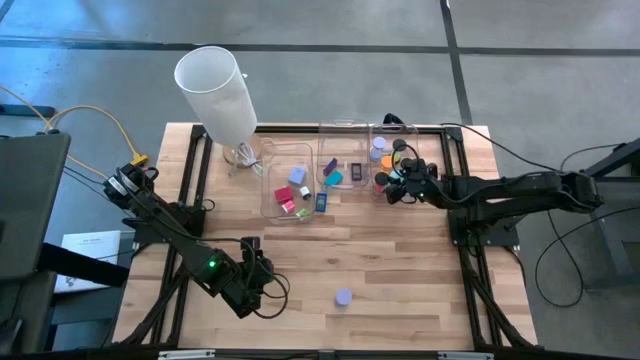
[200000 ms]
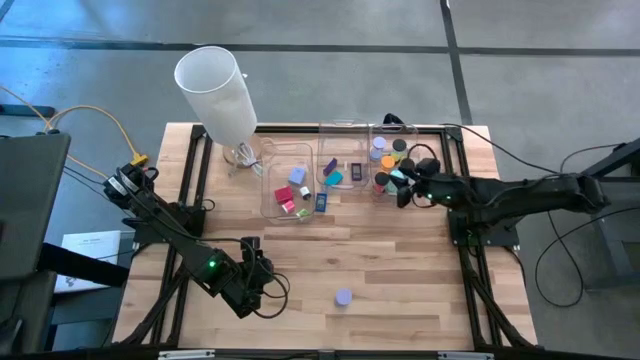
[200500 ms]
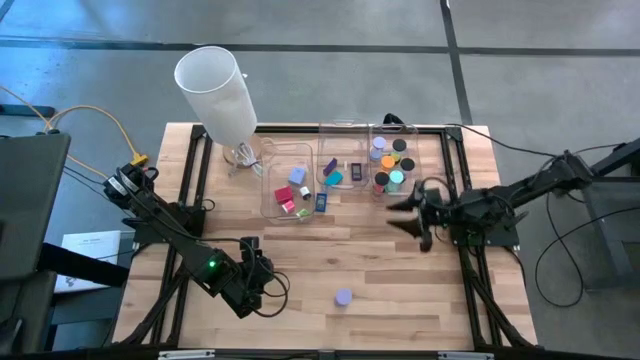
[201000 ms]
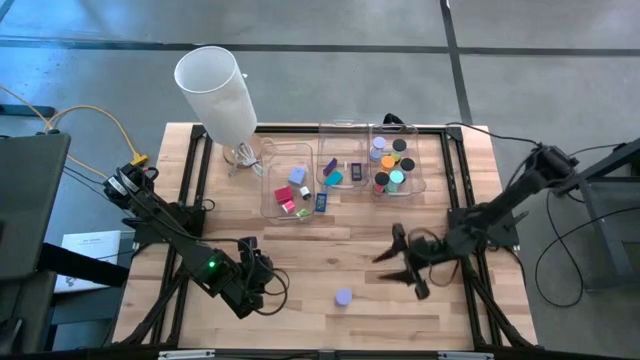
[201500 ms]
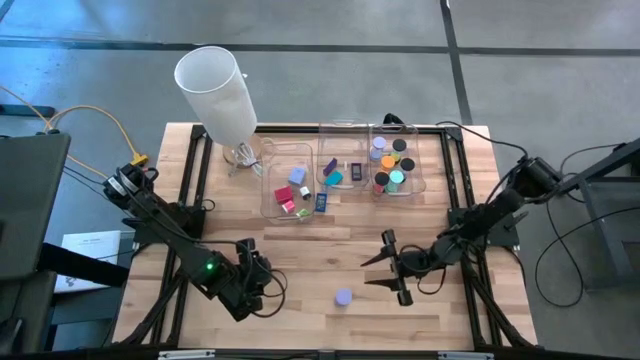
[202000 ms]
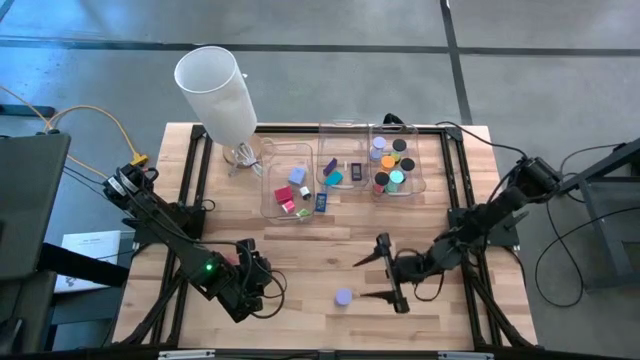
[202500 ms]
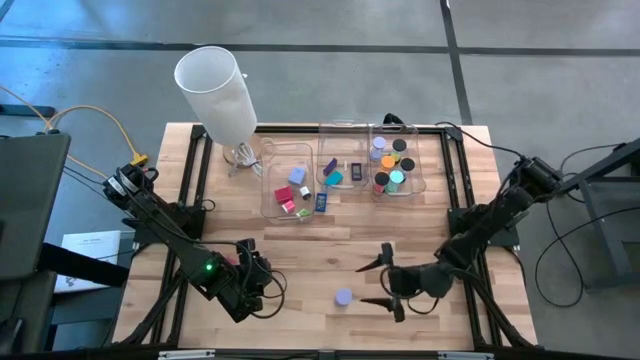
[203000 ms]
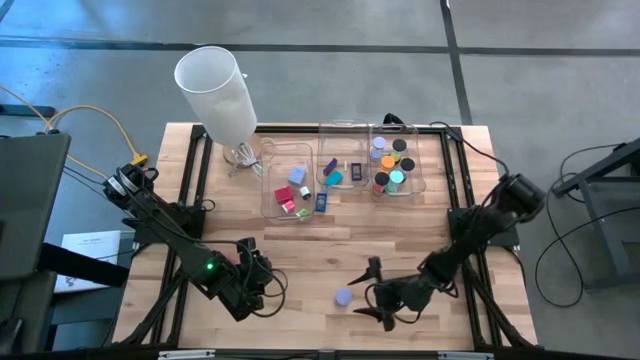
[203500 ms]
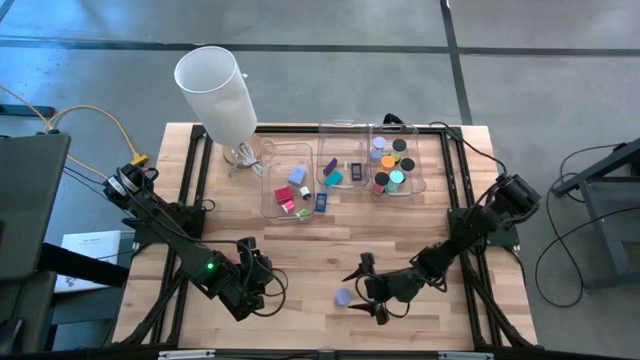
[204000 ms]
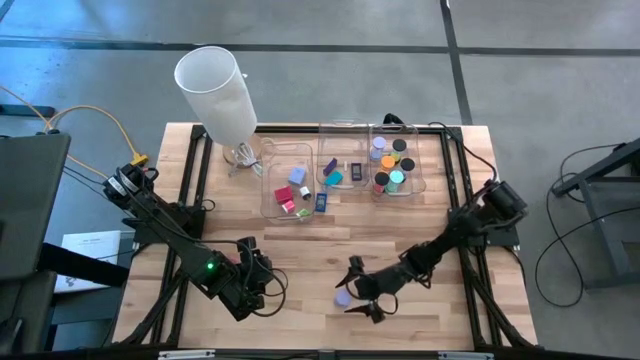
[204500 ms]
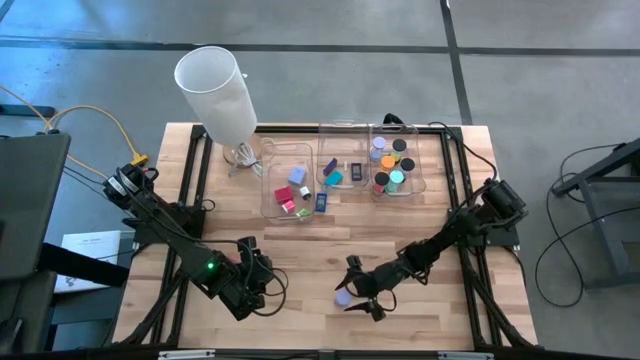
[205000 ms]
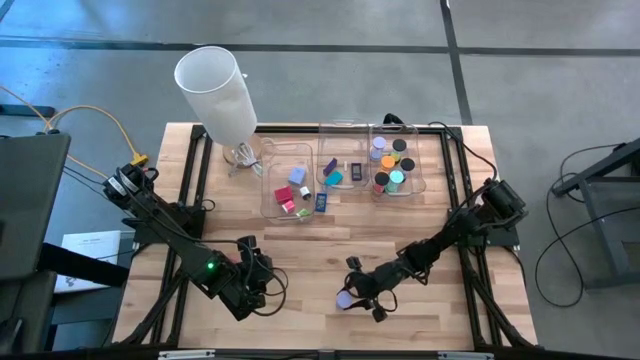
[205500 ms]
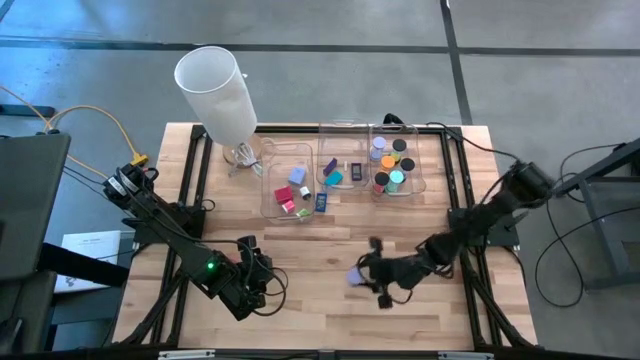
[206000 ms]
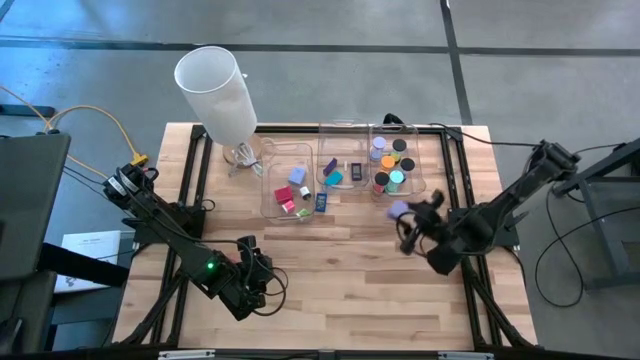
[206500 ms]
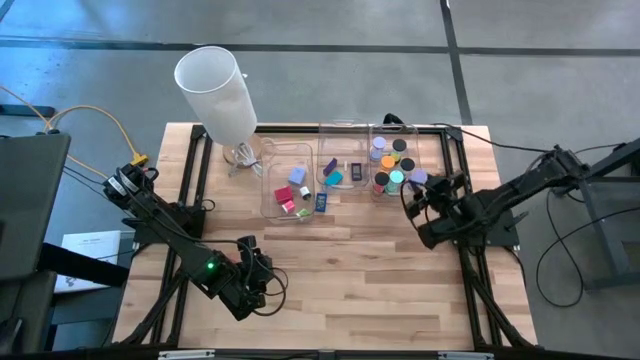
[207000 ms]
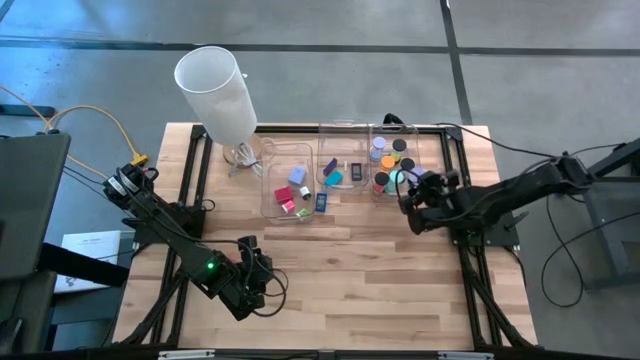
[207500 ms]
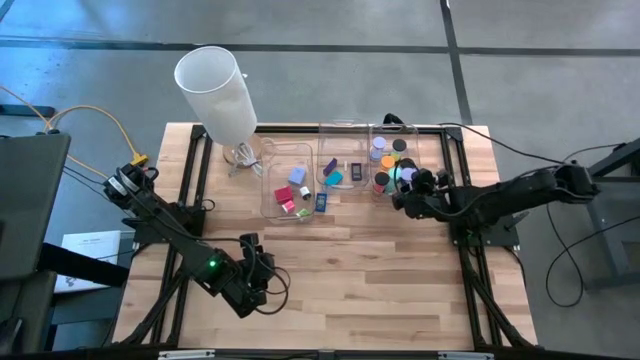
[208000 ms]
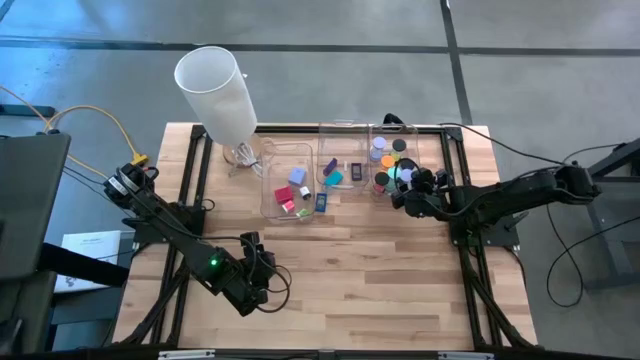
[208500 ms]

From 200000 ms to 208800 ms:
Task: Pick & Place Office items
Put the violet hourglass into the right transparent bin

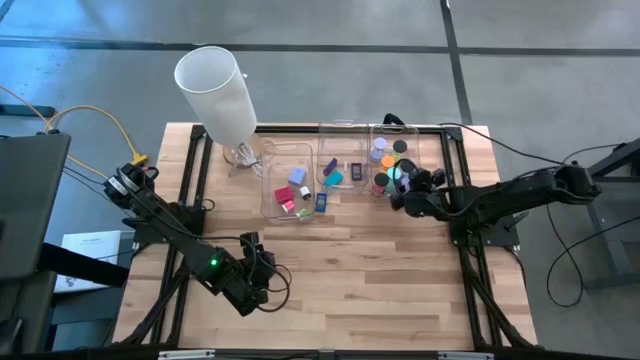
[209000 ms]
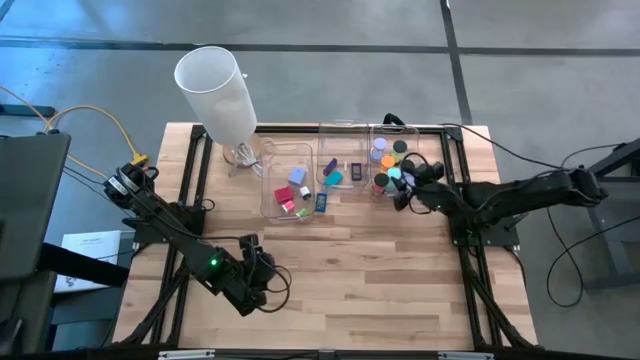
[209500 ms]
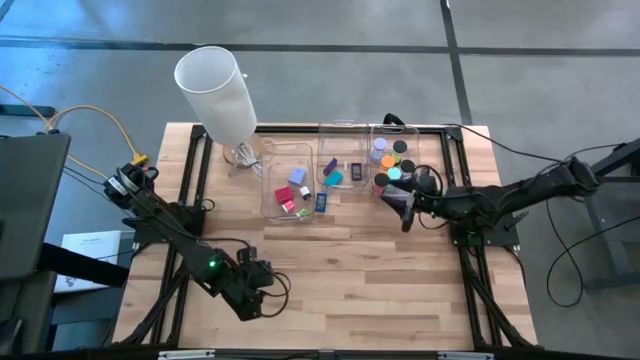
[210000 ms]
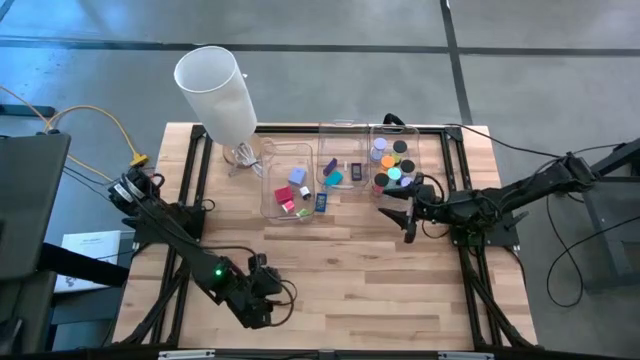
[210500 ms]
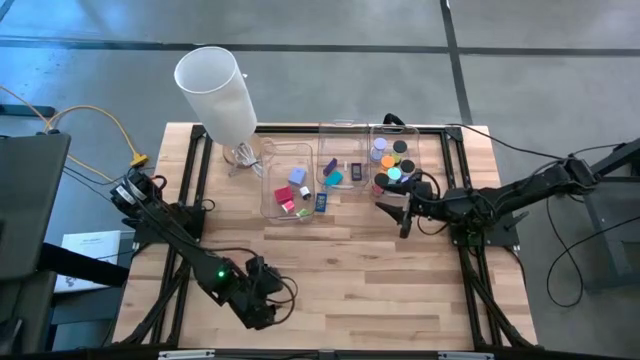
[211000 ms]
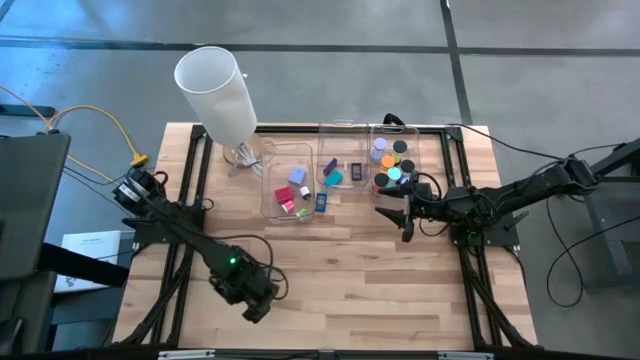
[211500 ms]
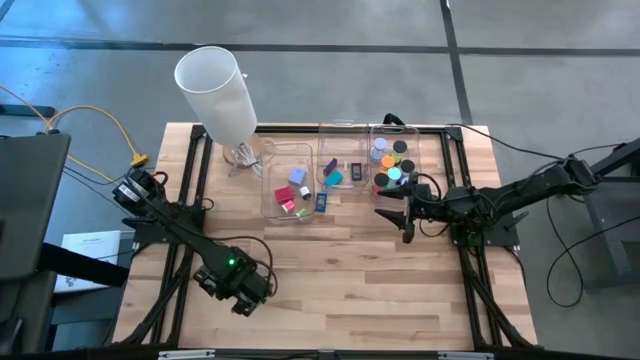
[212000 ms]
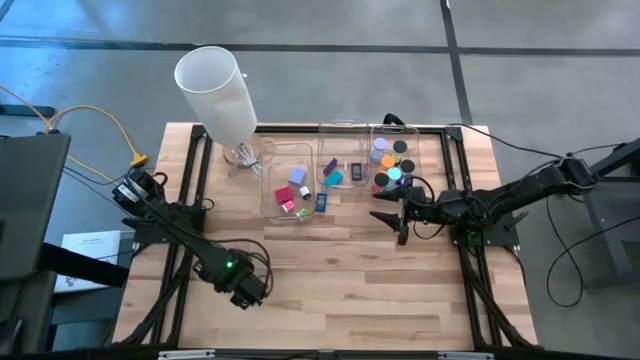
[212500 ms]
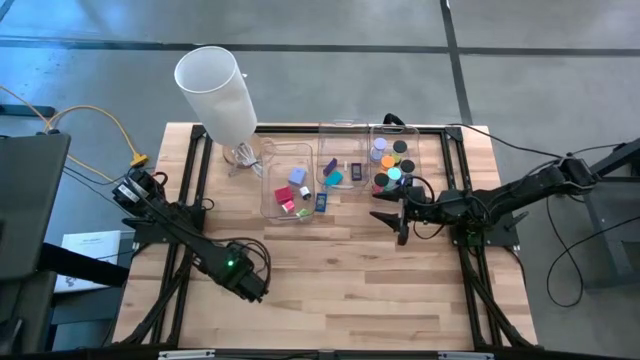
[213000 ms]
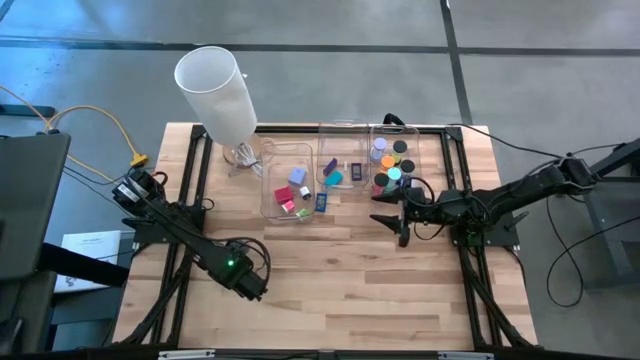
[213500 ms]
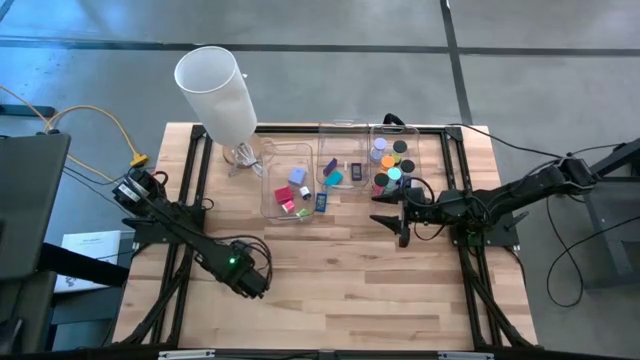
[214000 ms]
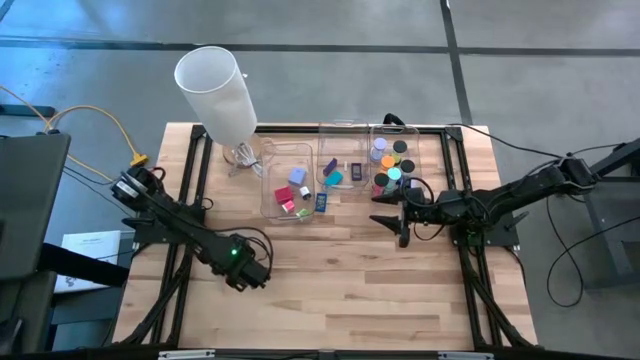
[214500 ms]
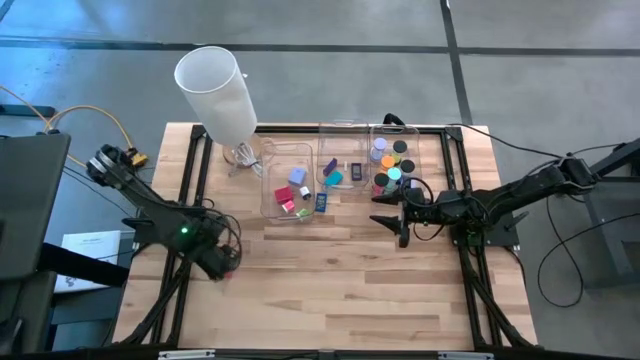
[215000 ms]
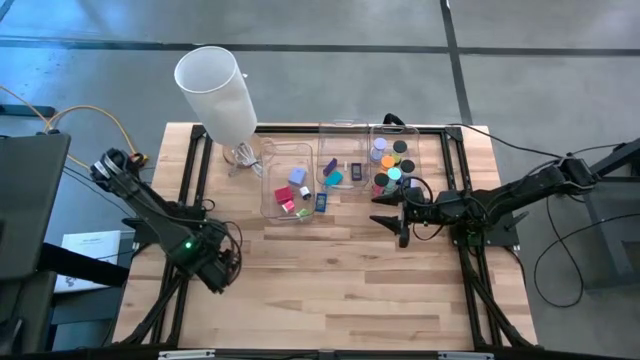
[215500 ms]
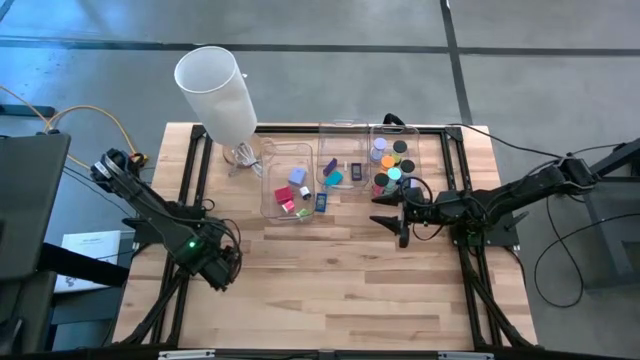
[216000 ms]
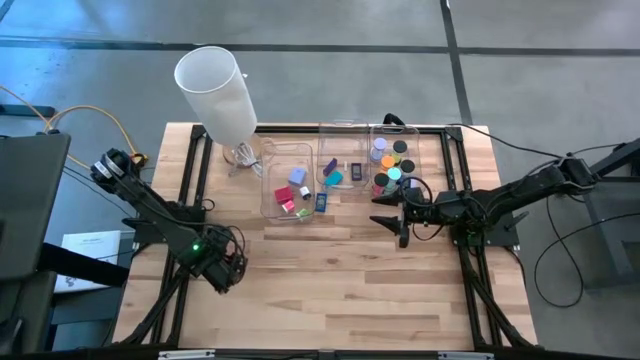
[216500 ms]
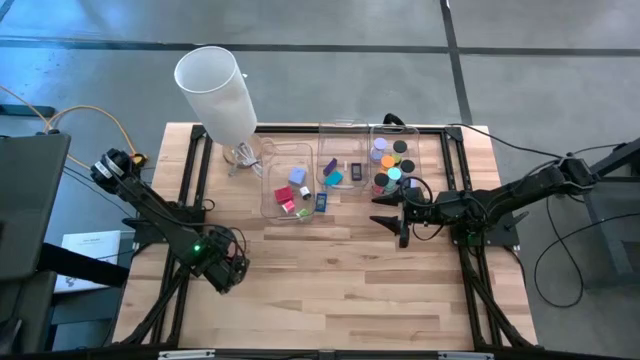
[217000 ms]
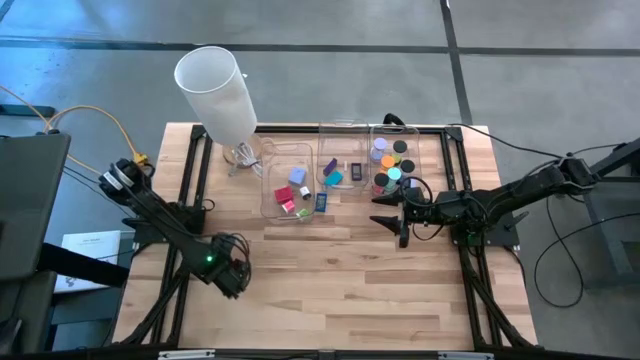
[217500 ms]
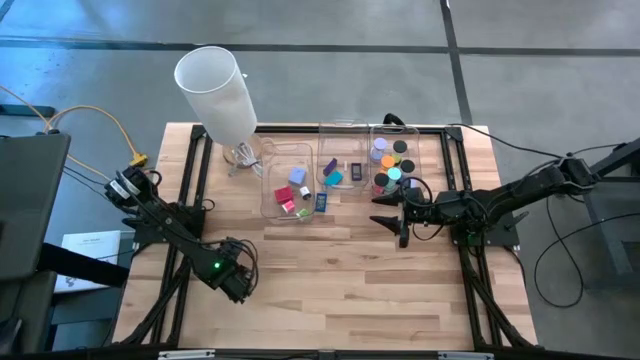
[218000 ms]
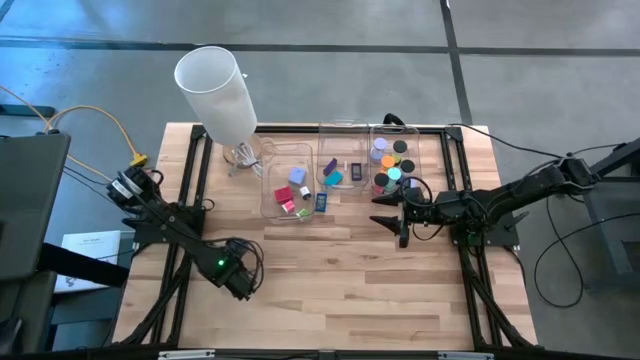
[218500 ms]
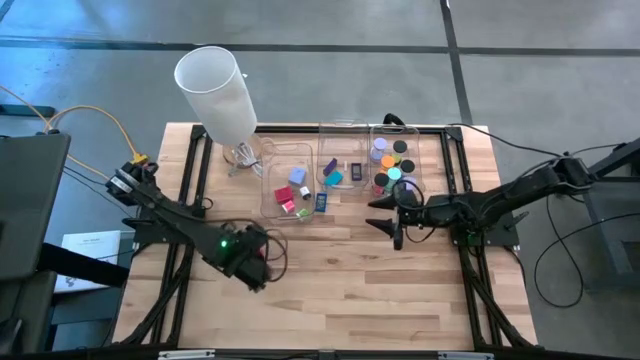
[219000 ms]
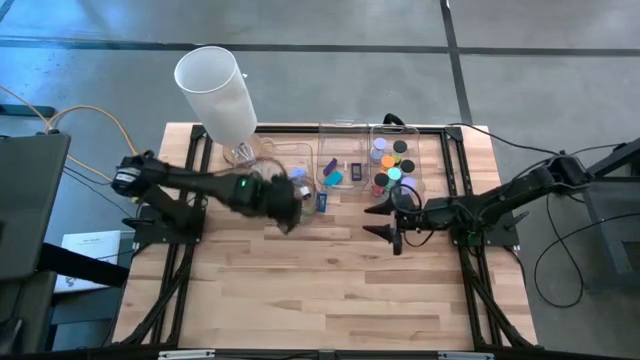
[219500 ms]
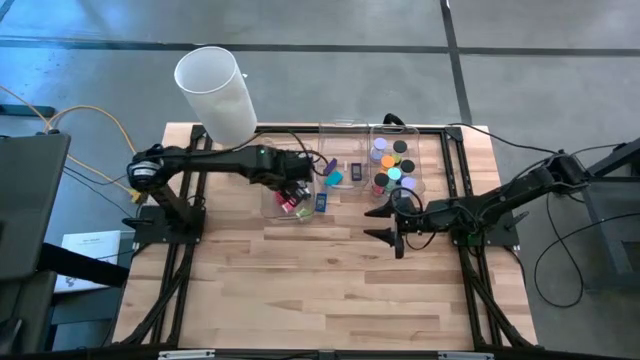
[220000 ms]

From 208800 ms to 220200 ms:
Put the red charger adapter into the left transparent bin
